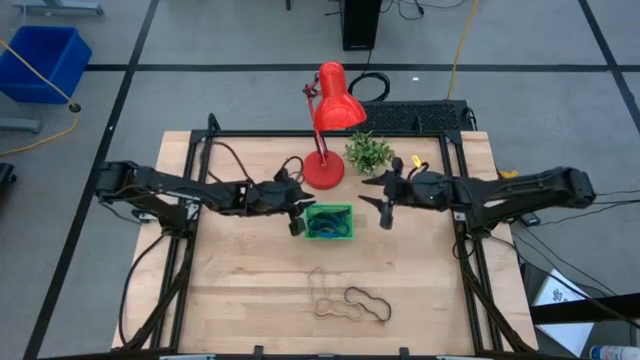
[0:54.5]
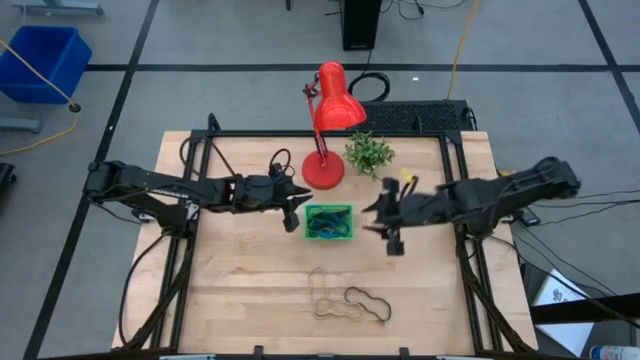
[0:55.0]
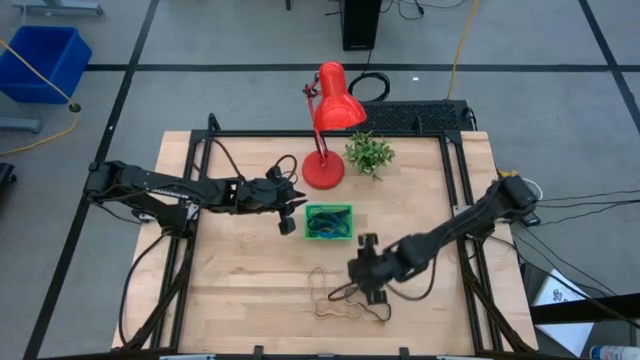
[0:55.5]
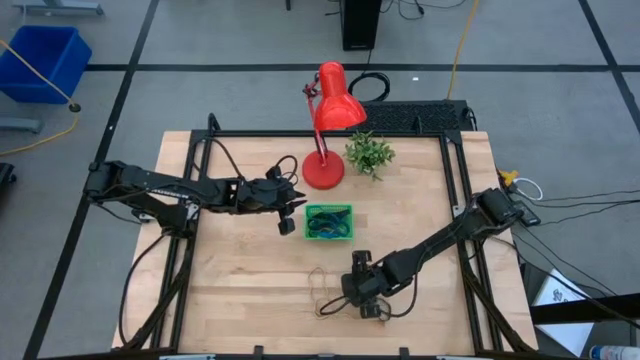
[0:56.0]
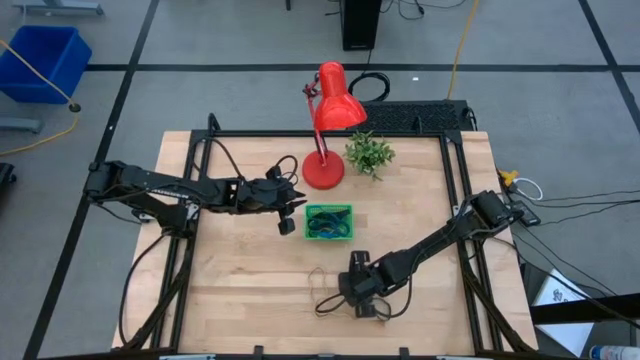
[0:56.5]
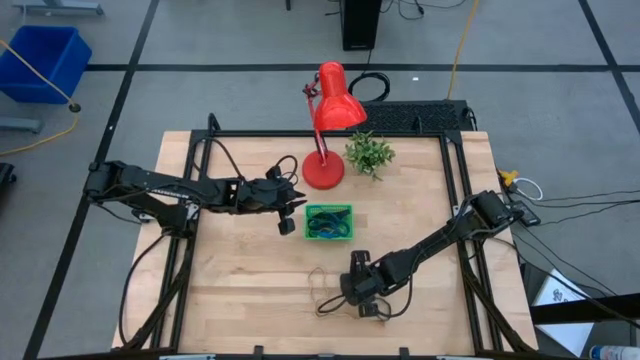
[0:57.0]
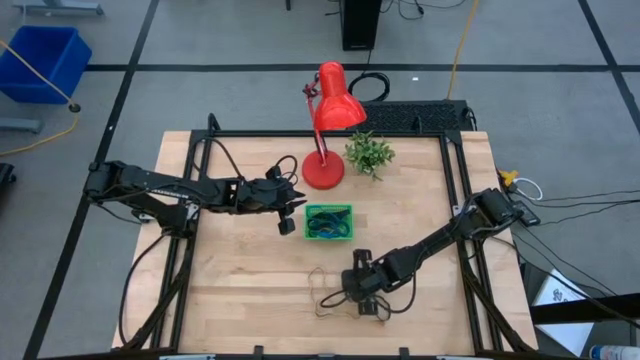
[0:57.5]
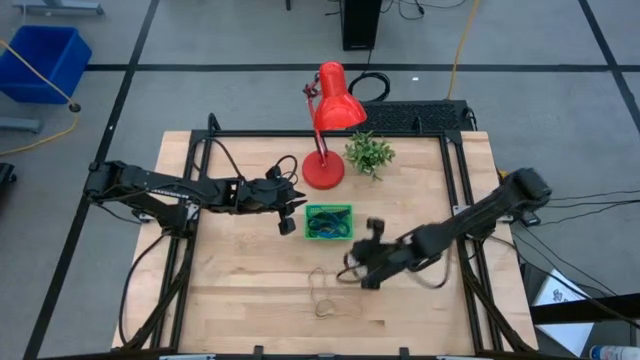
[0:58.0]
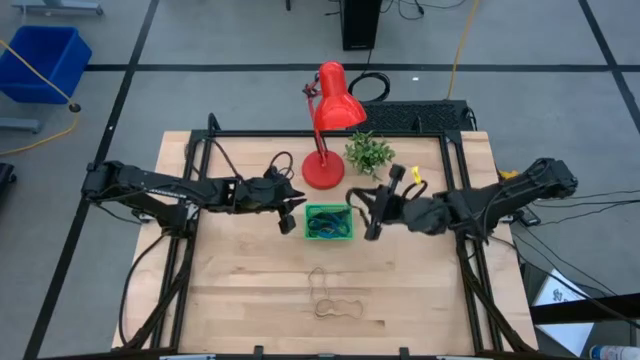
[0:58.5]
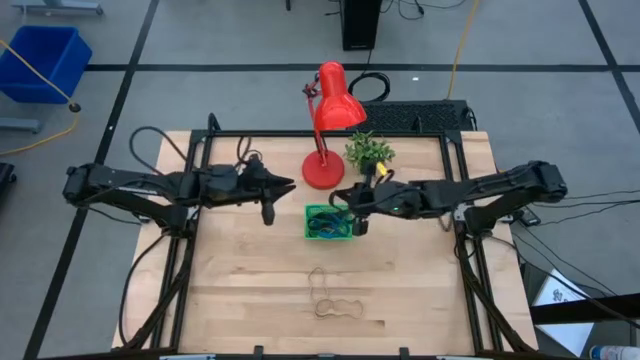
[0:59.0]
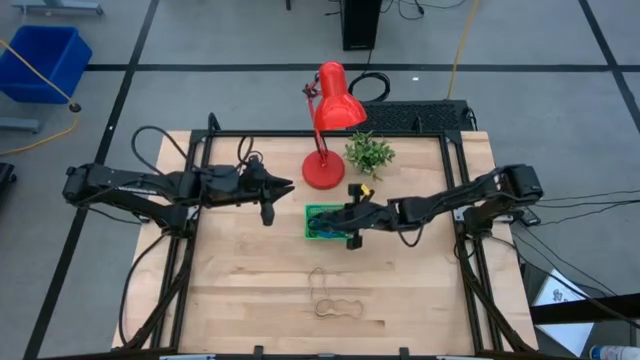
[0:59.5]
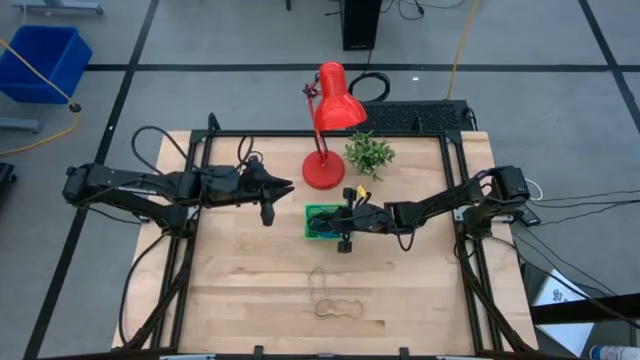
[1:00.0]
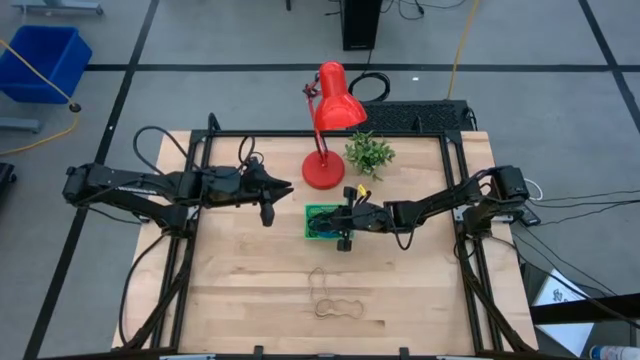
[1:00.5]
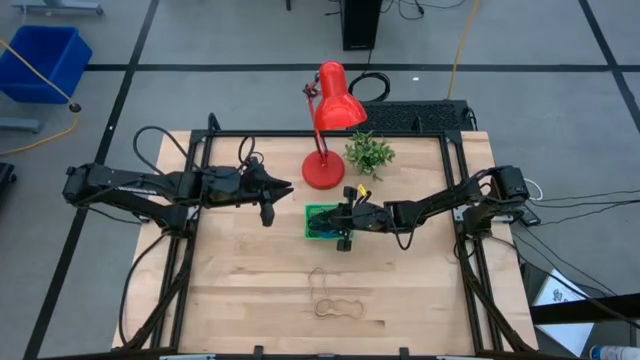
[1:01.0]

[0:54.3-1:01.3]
Task: Pick and place rubber bands into bin
Put the black rubber band into the green bin

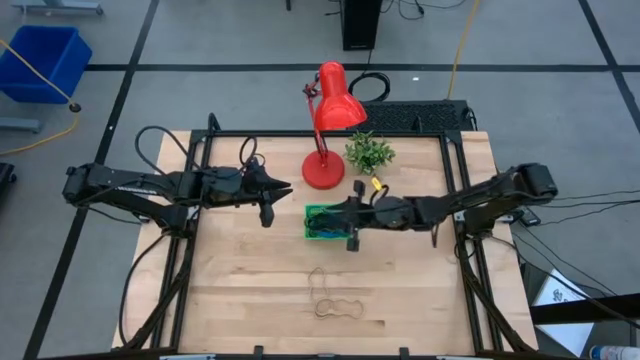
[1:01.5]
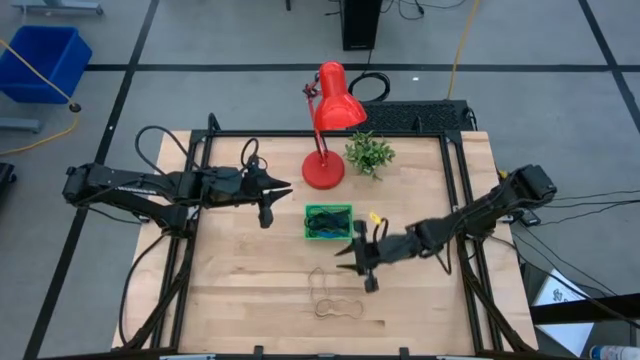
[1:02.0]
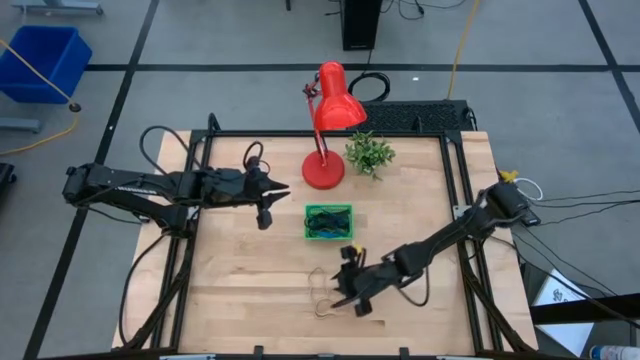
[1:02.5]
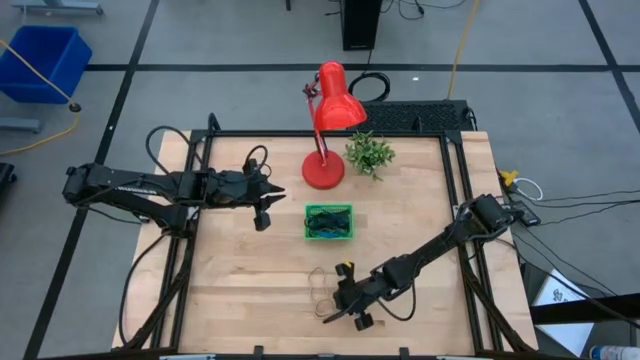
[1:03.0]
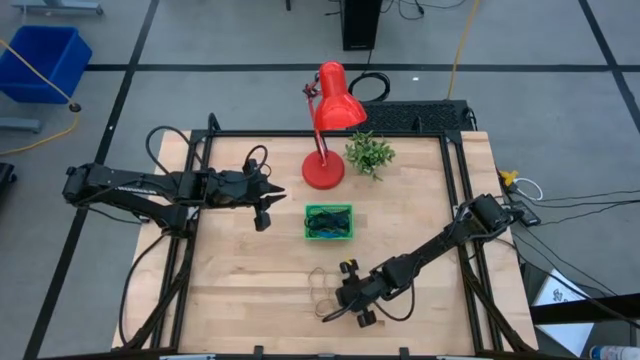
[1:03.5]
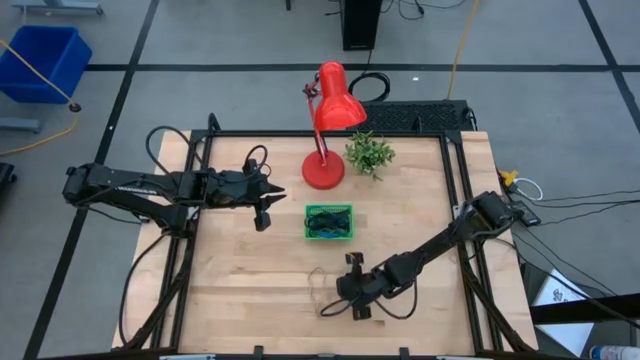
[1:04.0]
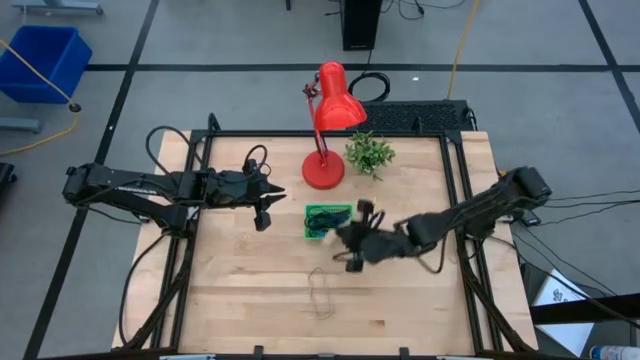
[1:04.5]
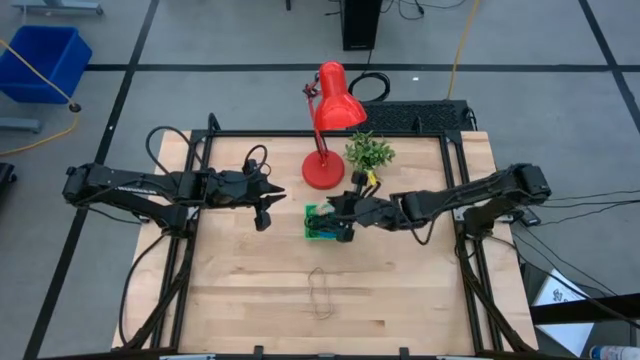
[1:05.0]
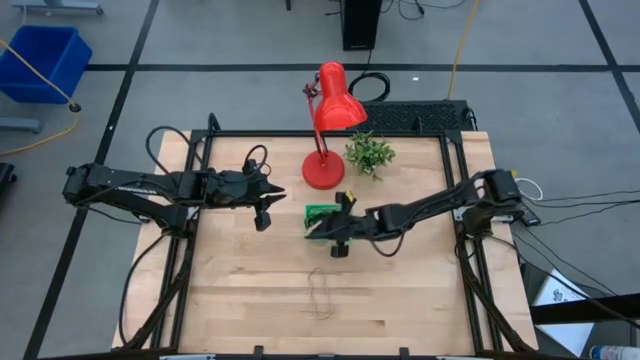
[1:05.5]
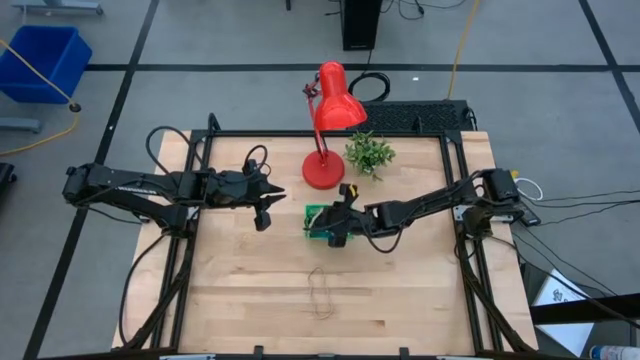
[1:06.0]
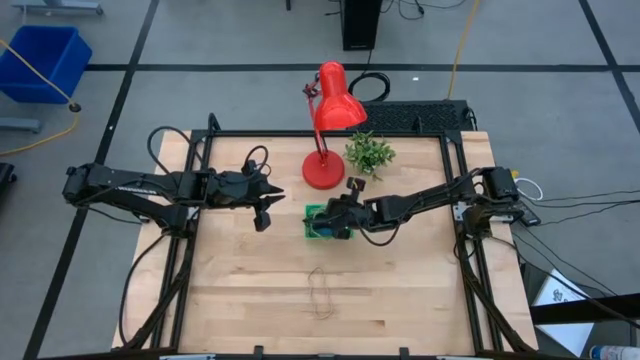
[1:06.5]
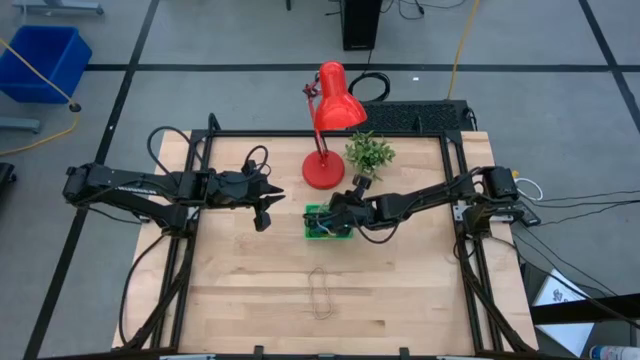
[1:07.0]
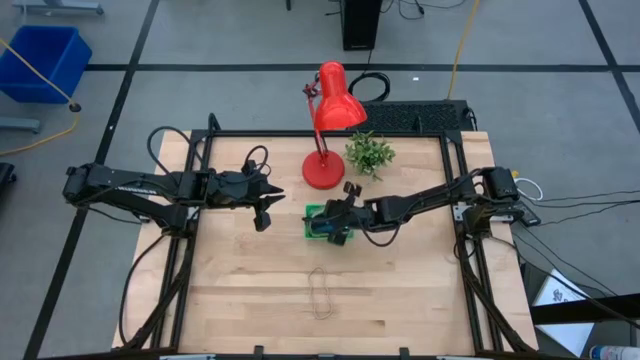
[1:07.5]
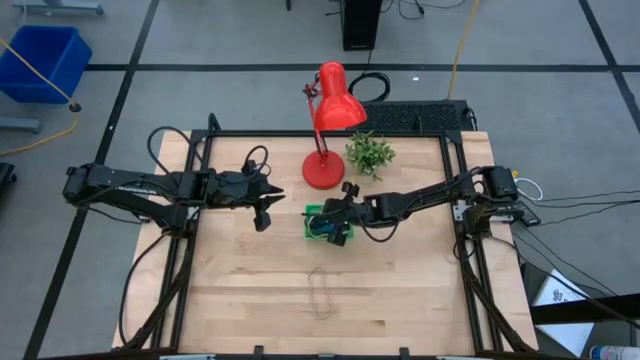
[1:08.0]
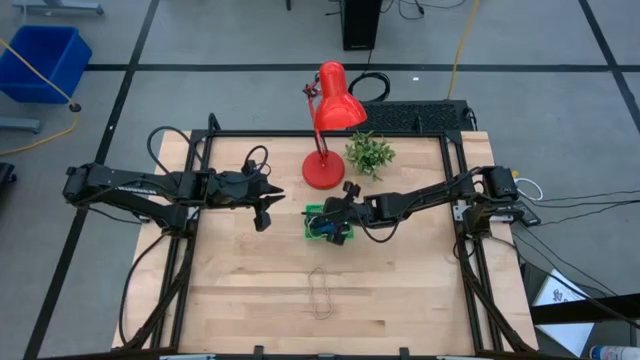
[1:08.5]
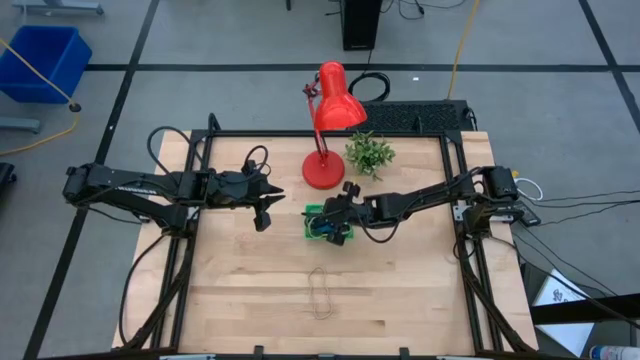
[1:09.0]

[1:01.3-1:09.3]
Put the bottom brown rubber band into the green bin

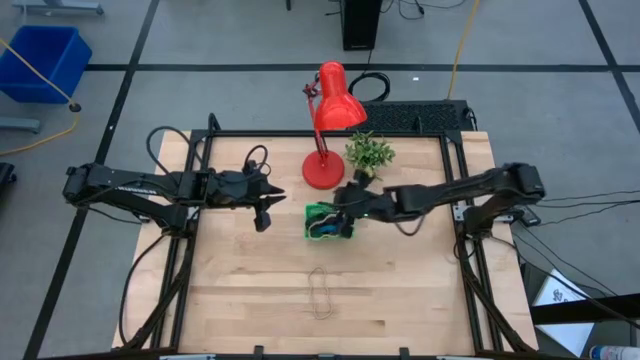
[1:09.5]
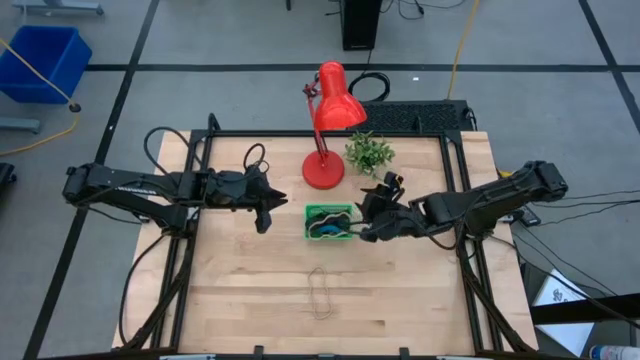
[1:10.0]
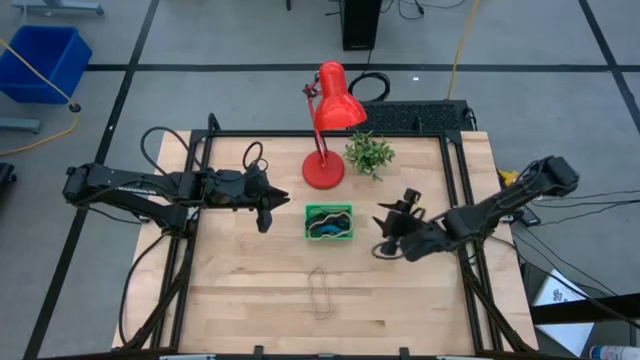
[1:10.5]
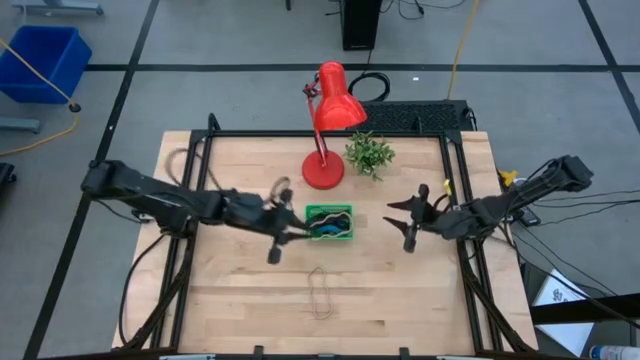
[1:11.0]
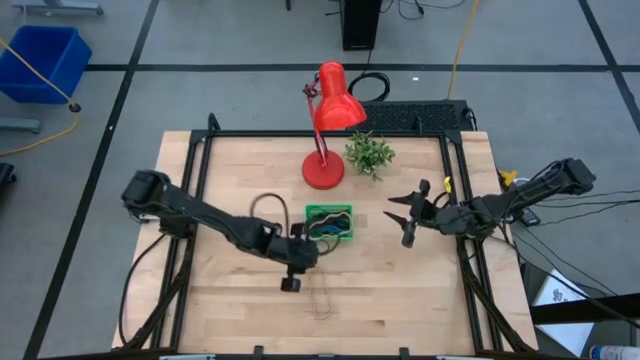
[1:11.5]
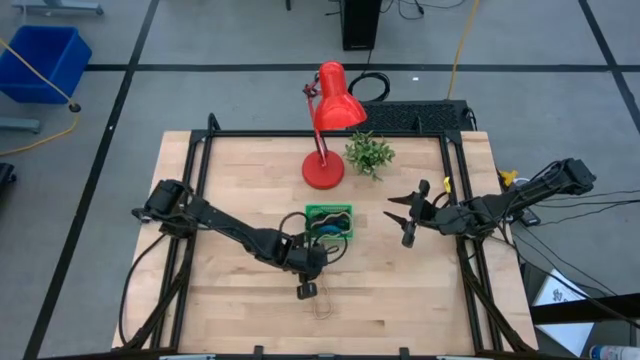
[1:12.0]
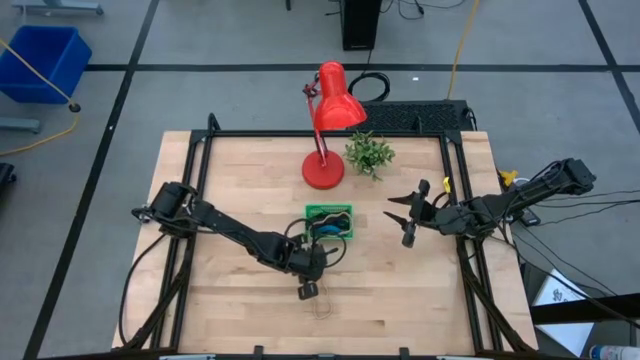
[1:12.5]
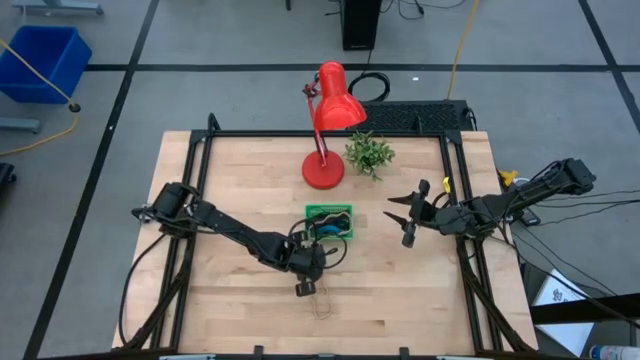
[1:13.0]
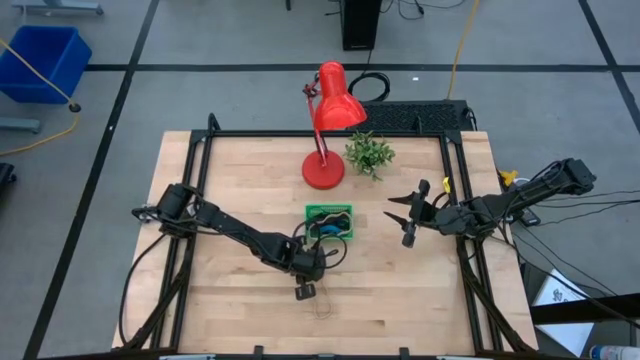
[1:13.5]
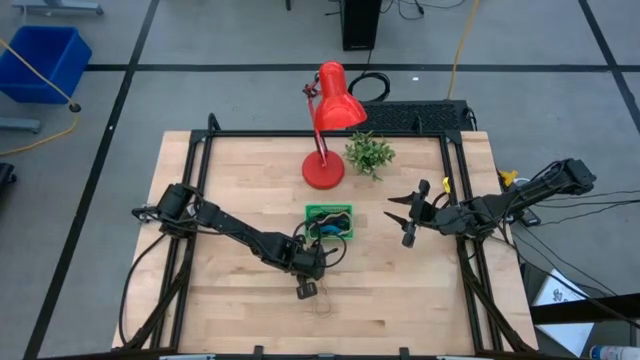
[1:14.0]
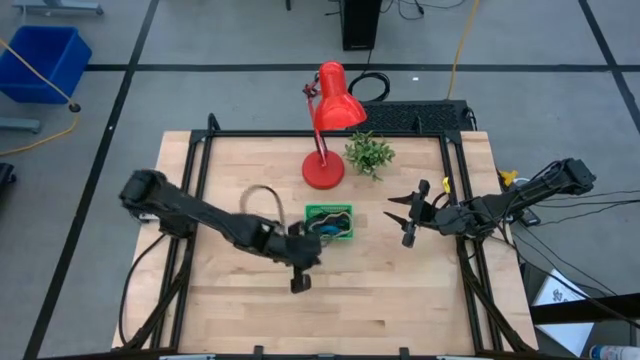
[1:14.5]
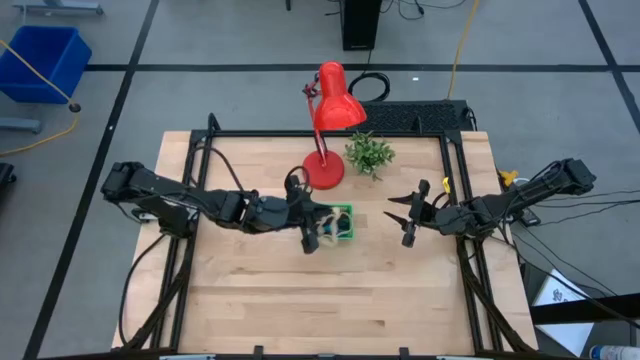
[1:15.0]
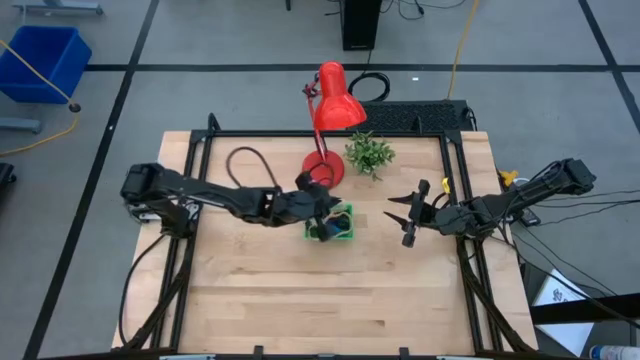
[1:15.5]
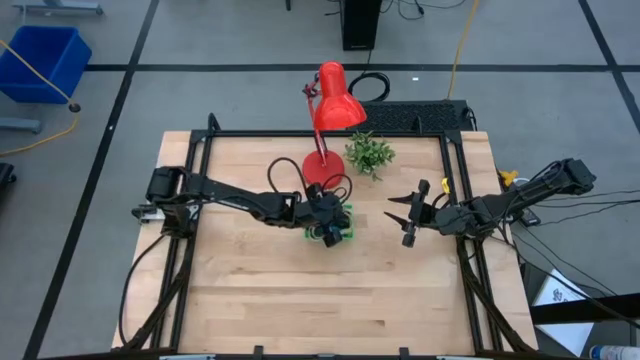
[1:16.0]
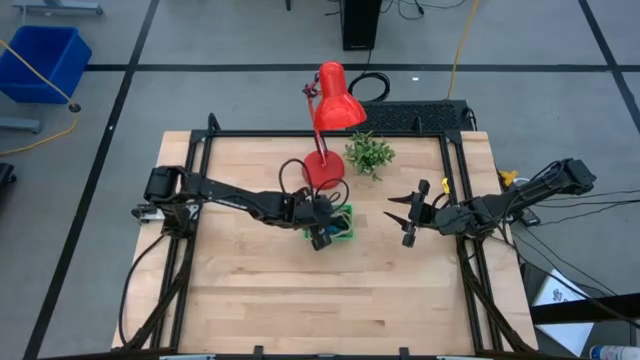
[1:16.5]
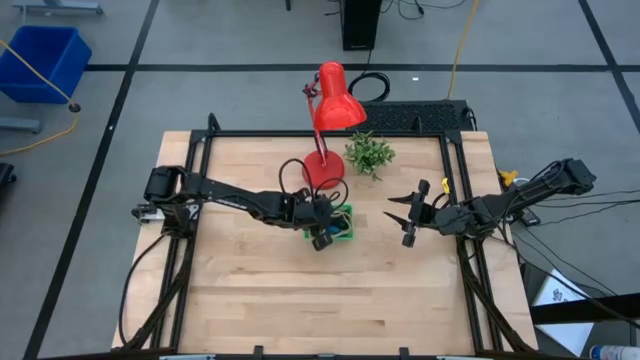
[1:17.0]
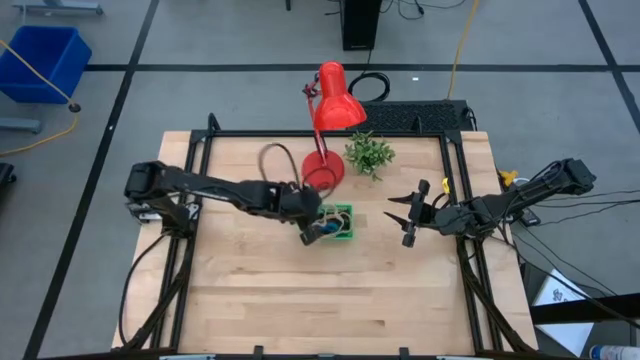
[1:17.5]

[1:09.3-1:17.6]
Put the brown rubber band into the green bin
